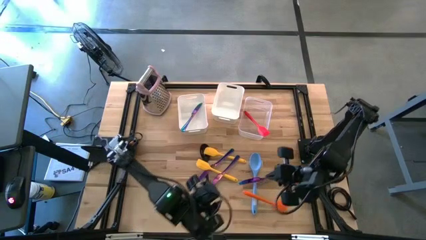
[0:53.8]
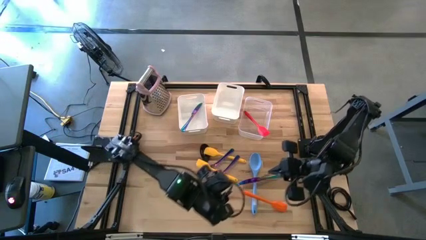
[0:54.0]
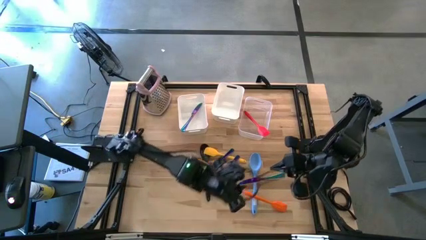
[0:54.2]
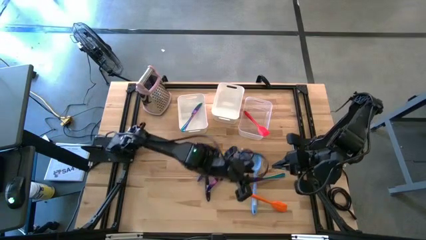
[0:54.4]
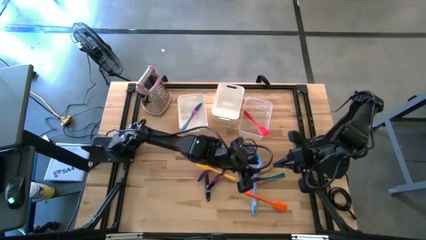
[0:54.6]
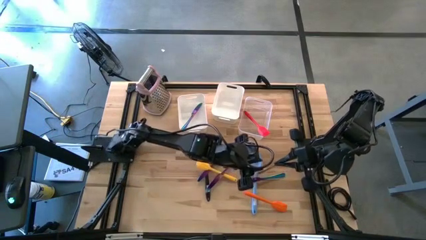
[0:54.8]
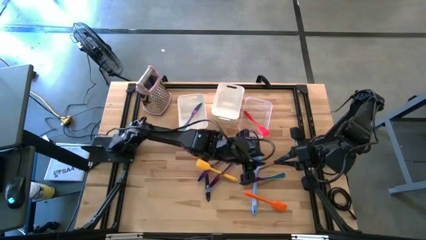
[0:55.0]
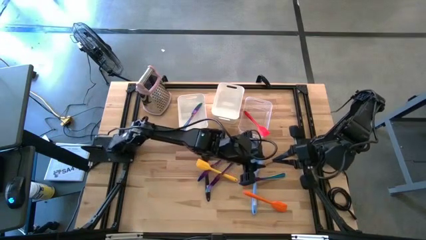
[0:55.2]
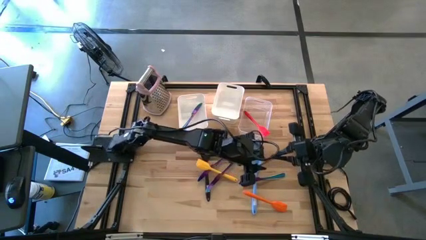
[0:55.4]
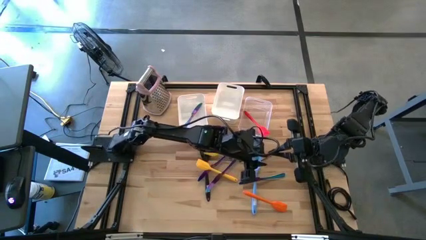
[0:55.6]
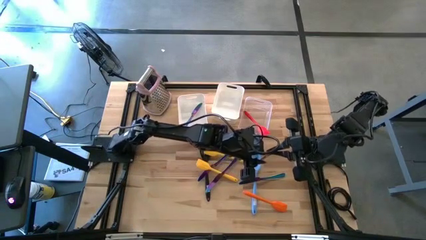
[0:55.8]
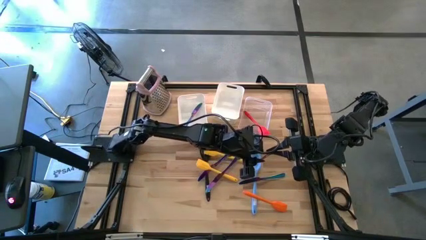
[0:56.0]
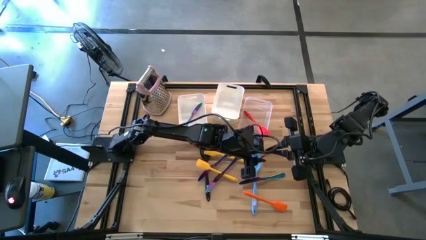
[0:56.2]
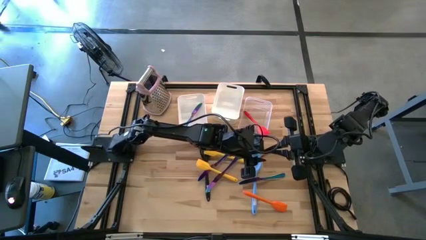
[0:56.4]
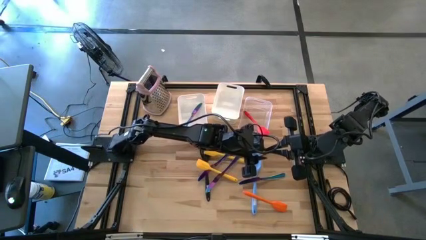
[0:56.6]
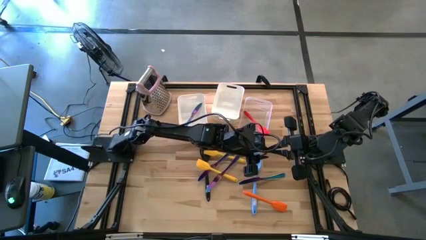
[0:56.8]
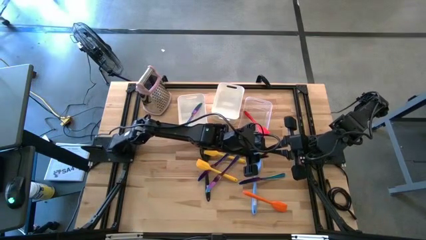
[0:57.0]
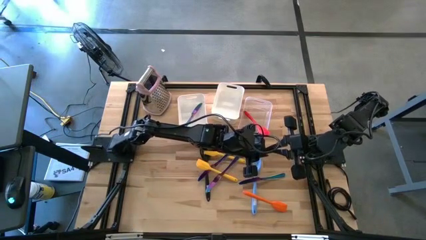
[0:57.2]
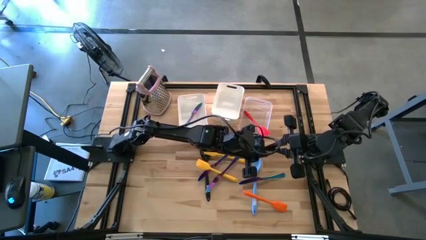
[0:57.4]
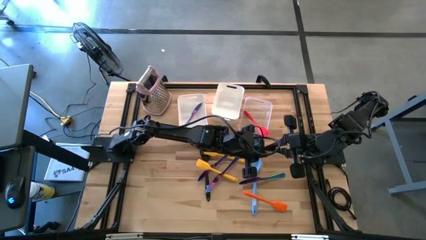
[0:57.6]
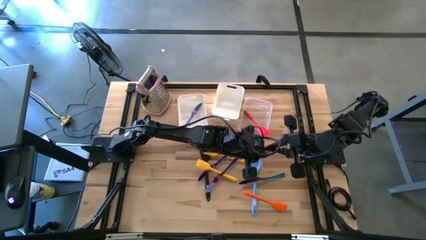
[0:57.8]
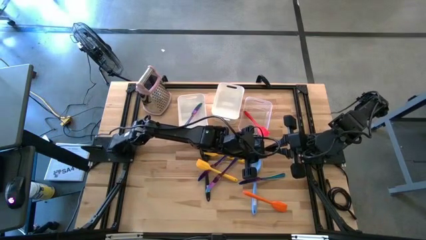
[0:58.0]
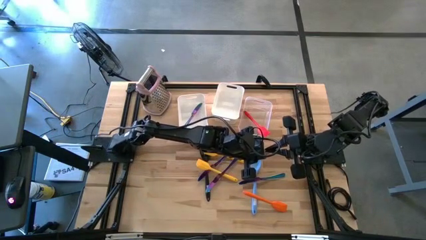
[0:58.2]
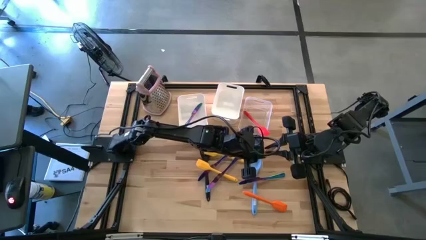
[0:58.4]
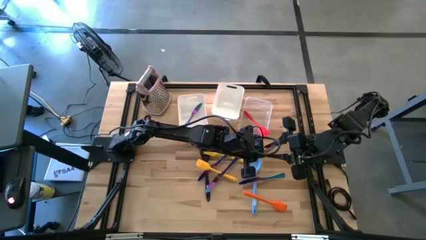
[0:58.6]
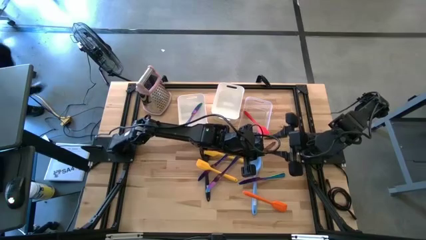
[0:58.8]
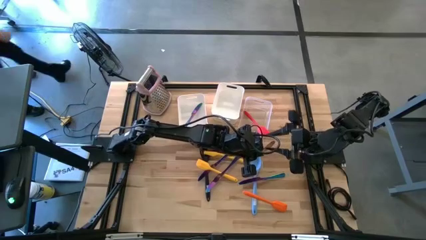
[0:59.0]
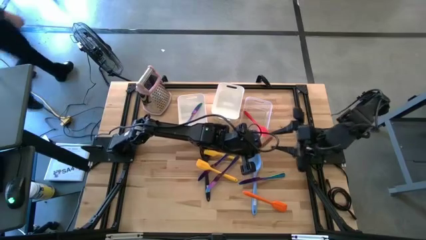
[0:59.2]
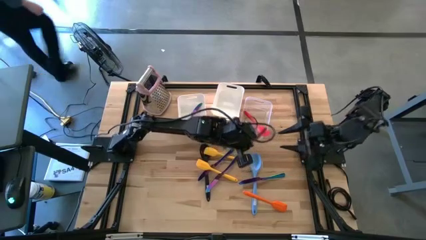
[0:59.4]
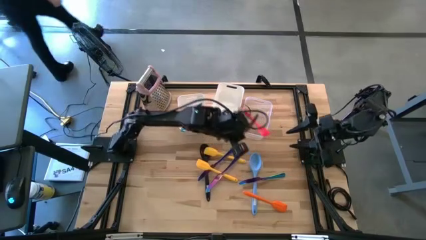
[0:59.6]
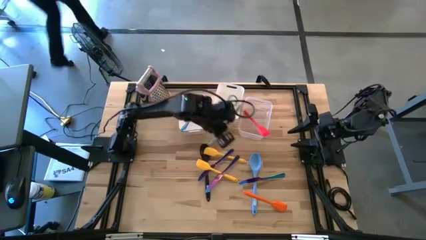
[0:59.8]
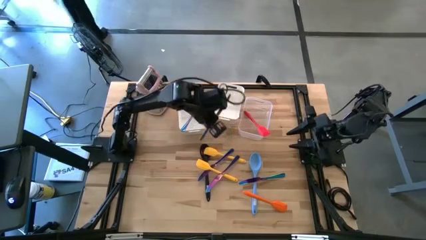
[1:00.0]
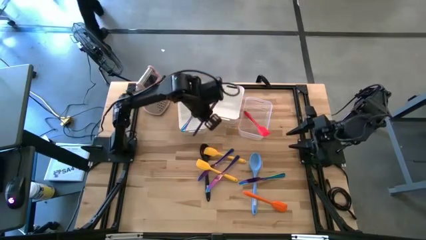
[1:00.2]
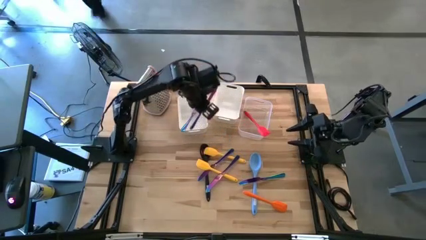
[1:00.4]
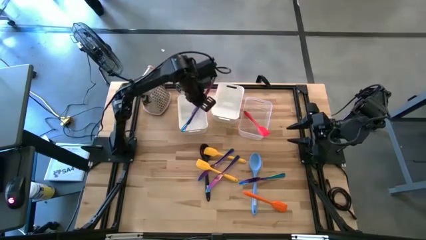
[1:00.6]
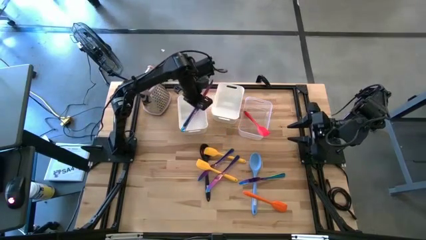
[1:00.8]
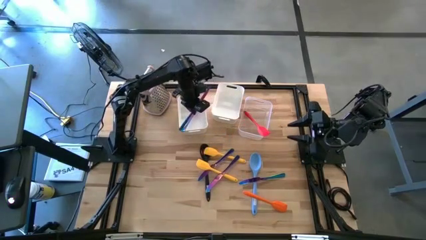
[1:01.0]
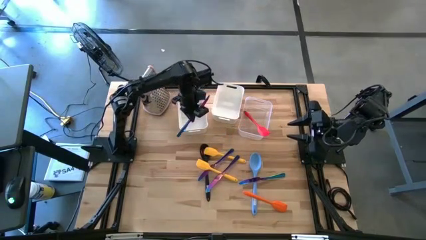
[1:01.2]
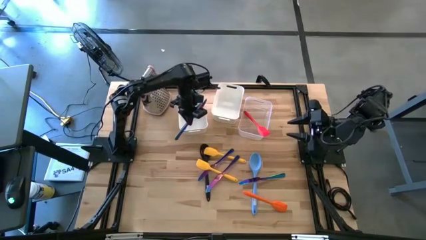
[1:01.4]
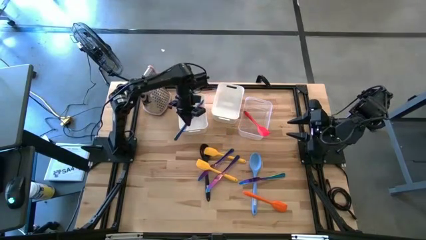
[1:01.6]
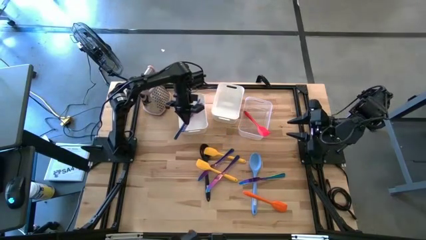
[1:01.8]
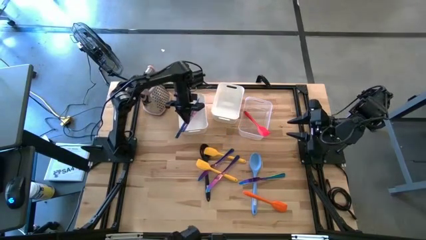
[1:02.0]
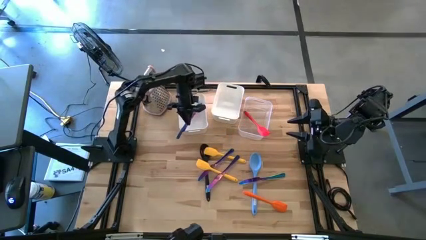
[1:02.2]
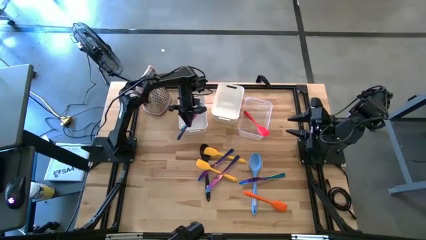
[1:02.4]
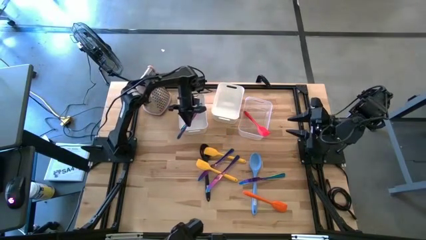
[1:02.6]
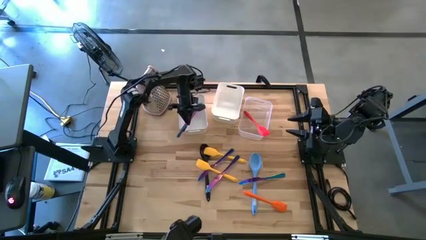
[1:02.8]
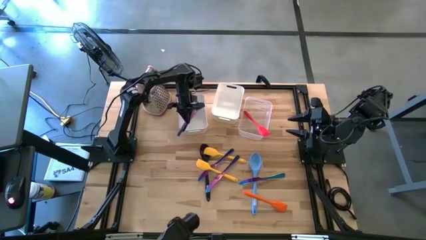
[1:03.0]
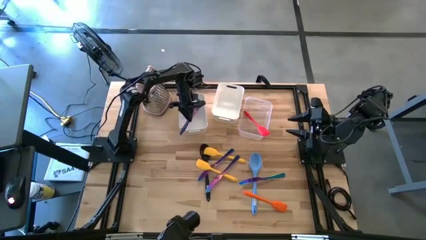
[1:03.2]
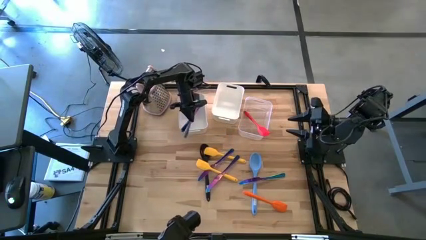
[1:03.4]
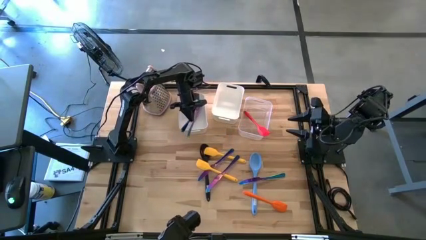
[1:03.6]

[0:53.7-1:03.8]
Task: Pick & Place Kitchen Items
Put the violet table knife into the left white bin
